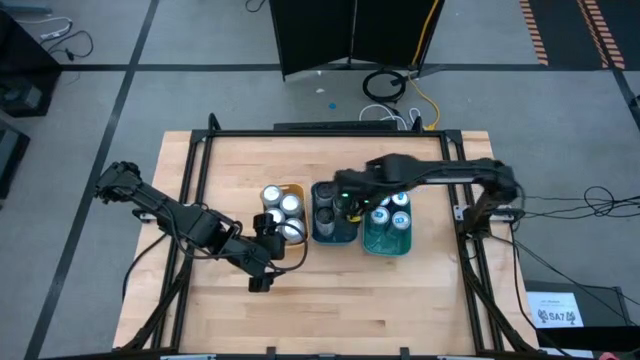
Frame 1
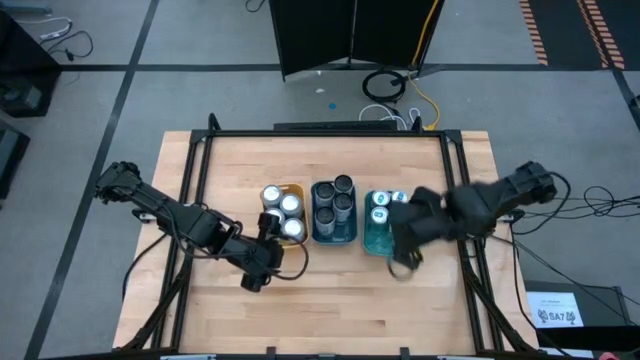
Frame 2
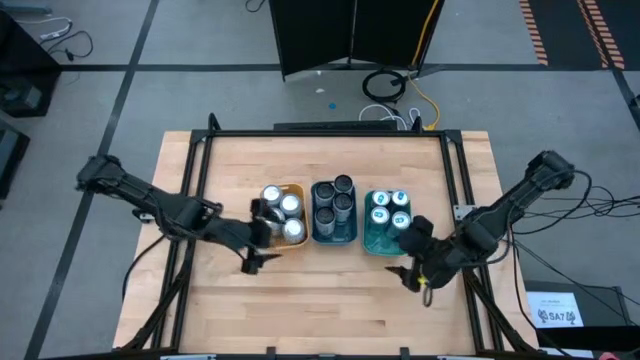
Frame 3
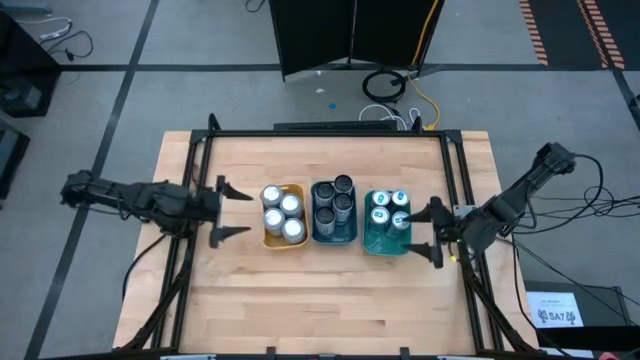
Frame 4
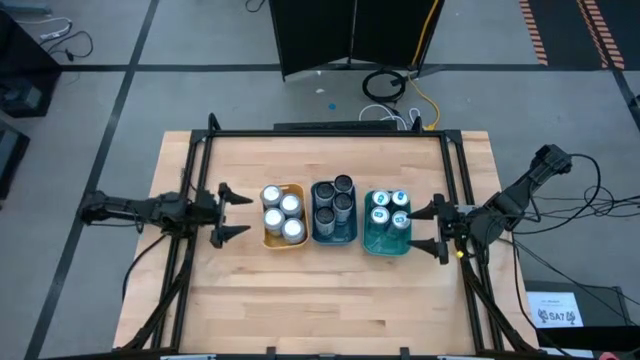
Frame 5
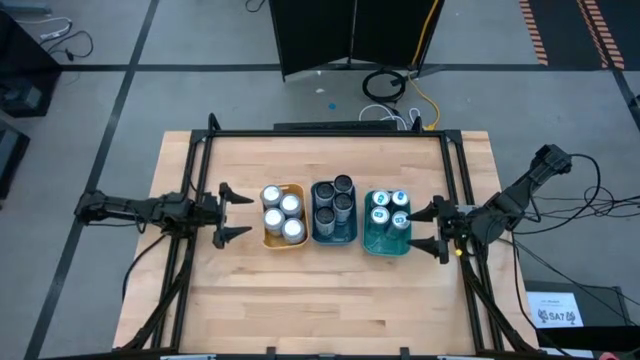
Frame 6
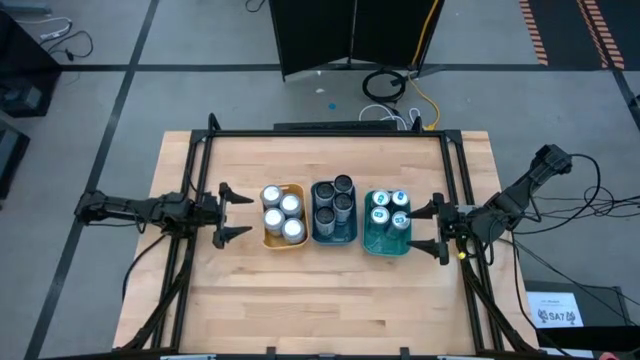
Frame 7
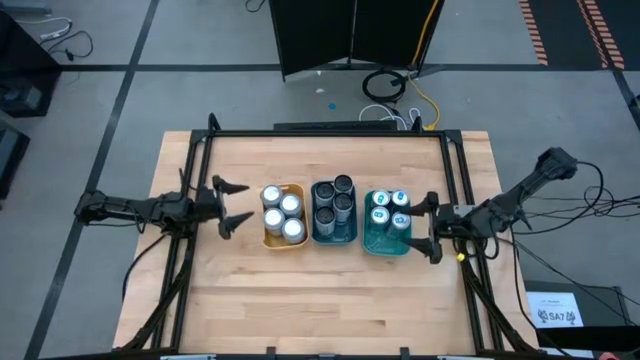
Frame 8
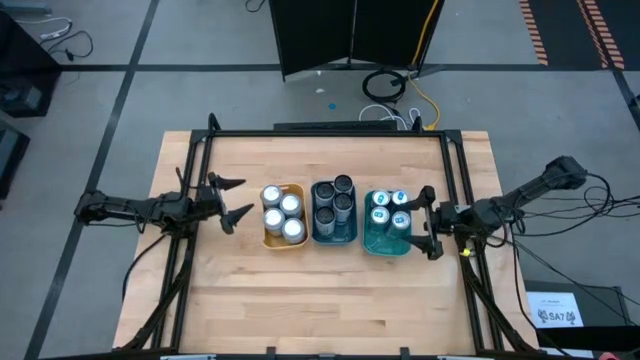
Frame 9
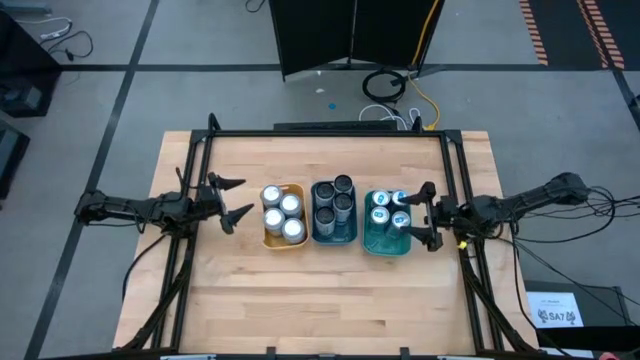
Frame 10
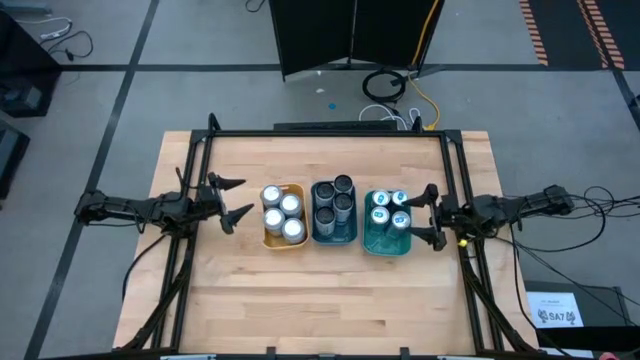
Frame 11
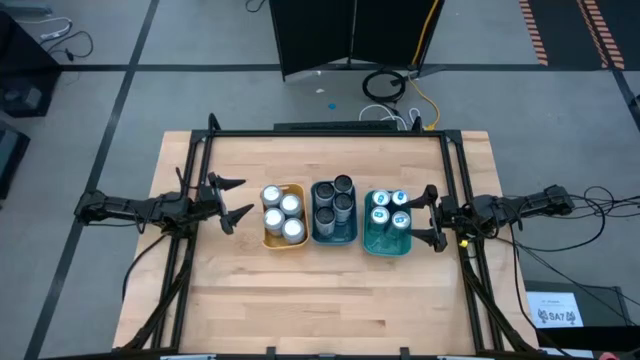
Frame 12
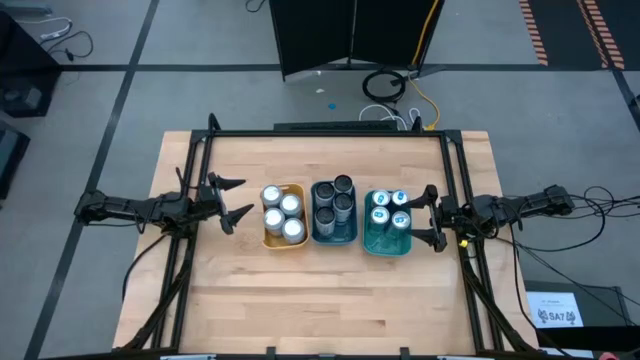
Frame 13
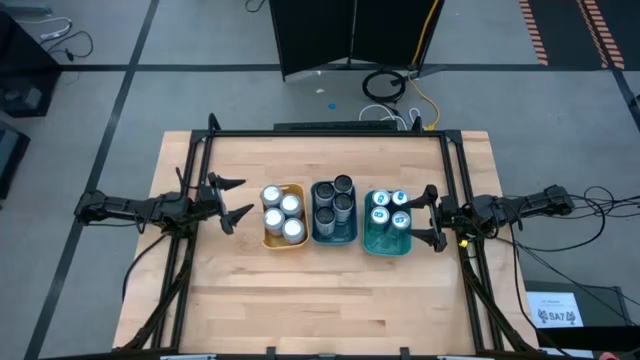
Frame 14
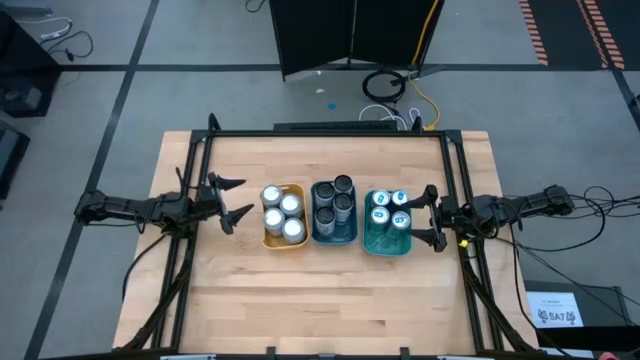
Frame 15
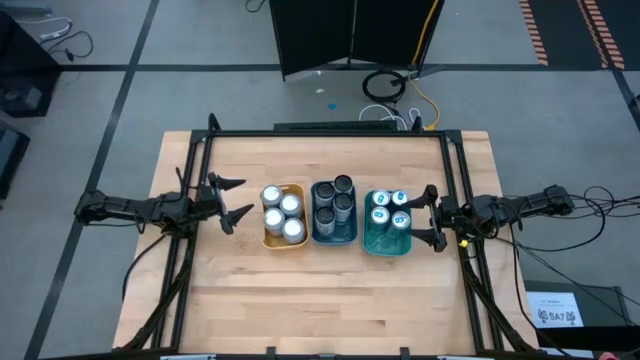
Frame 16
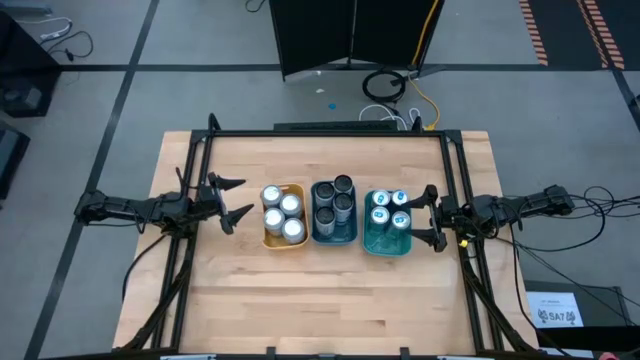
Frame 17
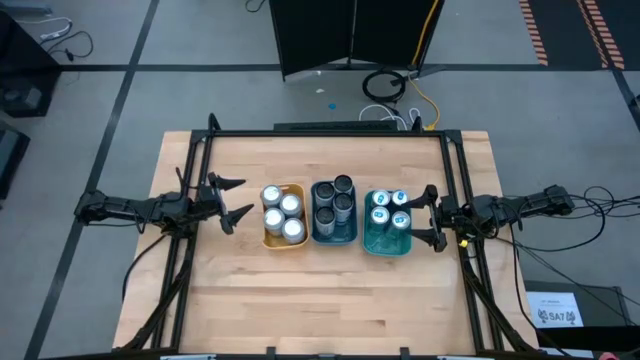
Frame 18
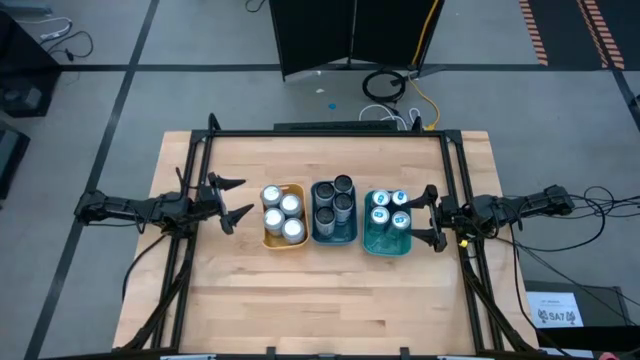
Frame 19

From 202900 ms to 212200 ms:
Task: Sort soda cans
Return to Home Position

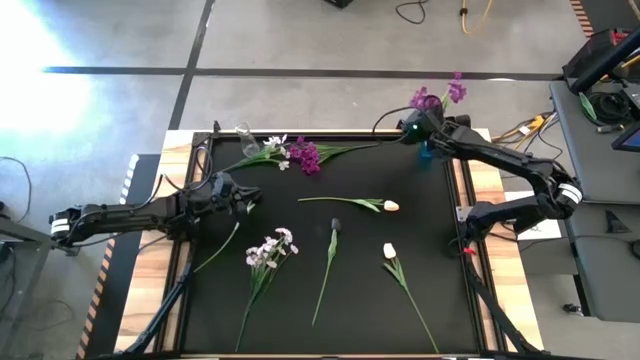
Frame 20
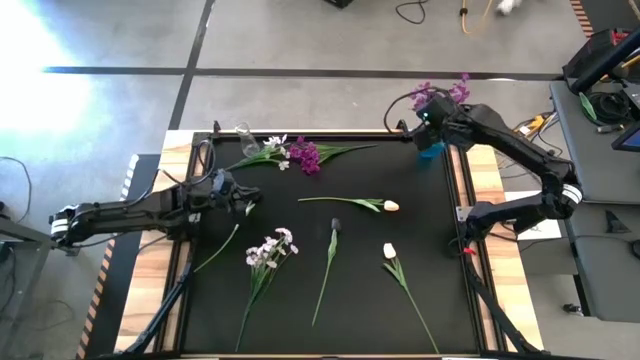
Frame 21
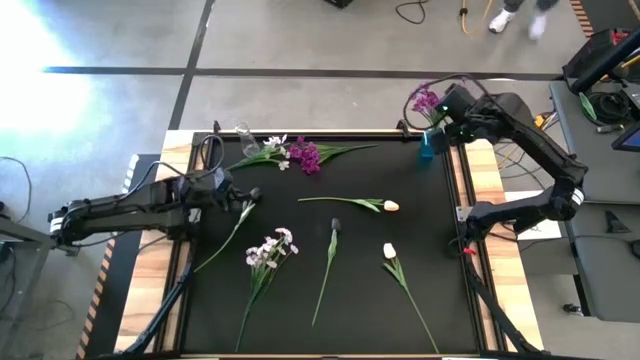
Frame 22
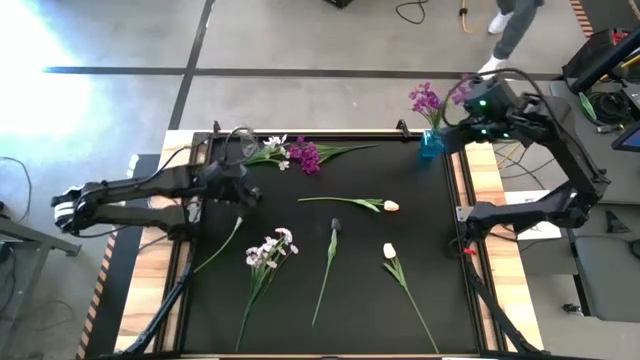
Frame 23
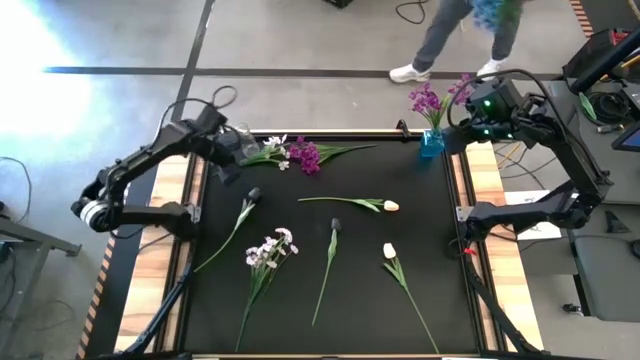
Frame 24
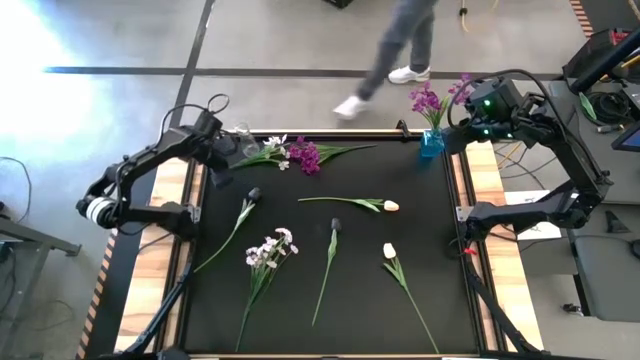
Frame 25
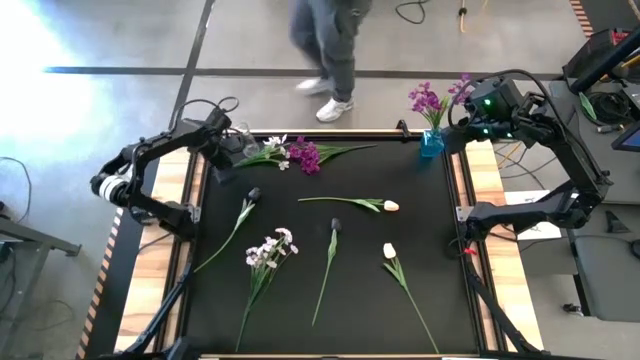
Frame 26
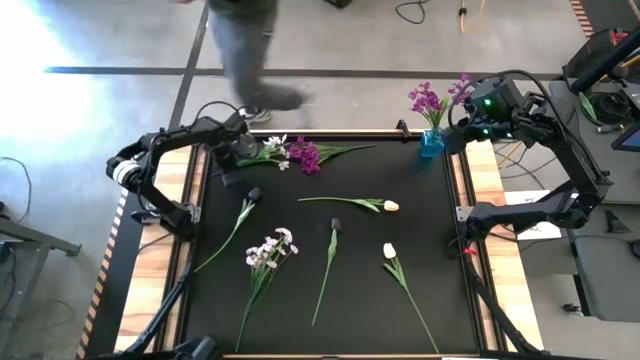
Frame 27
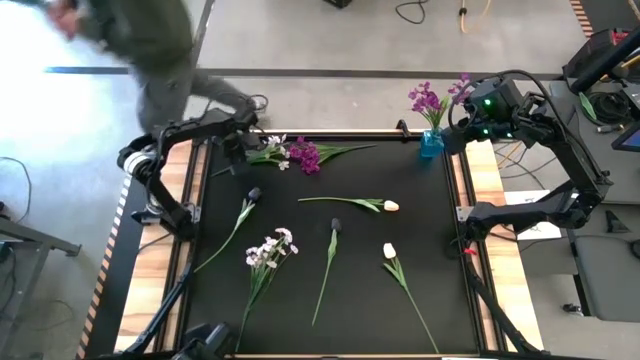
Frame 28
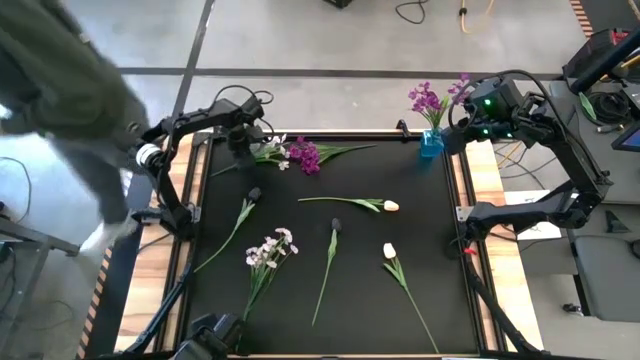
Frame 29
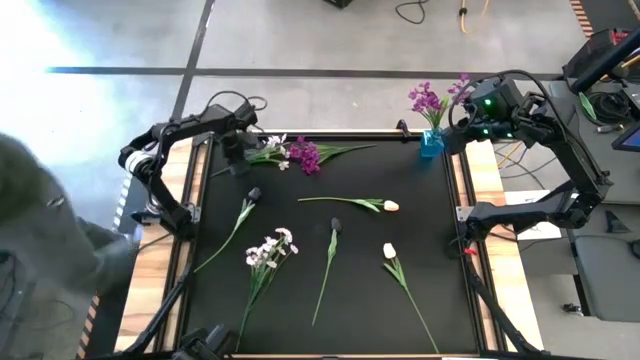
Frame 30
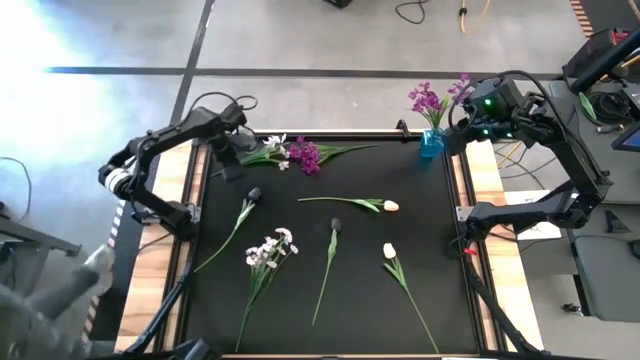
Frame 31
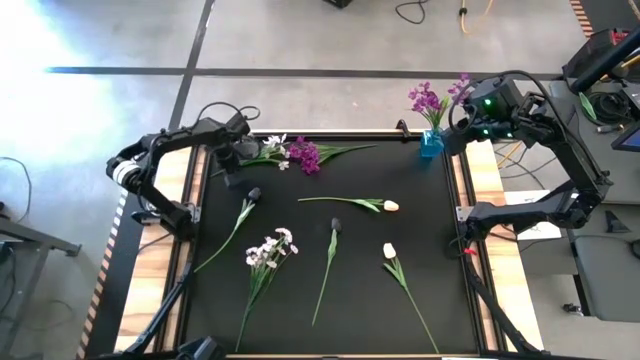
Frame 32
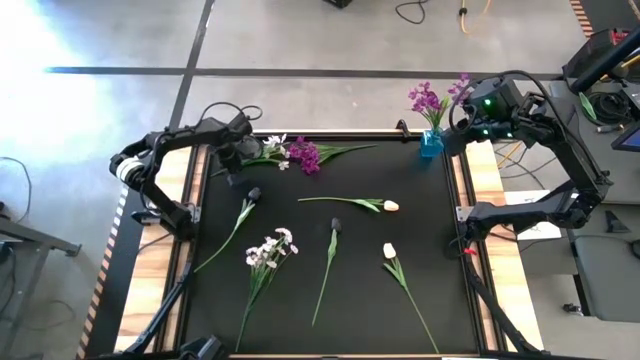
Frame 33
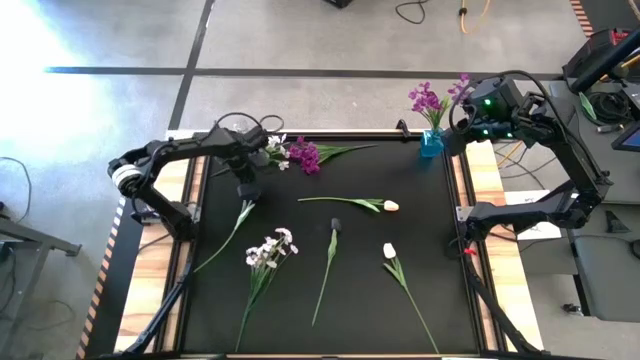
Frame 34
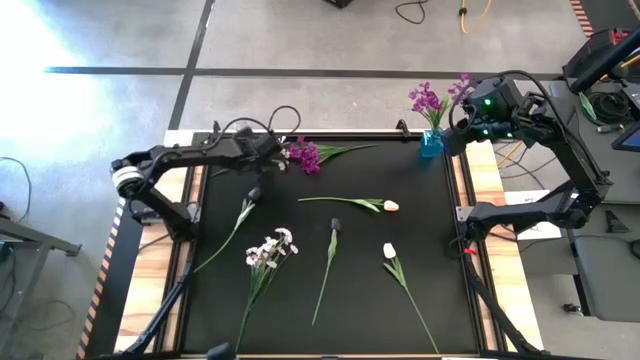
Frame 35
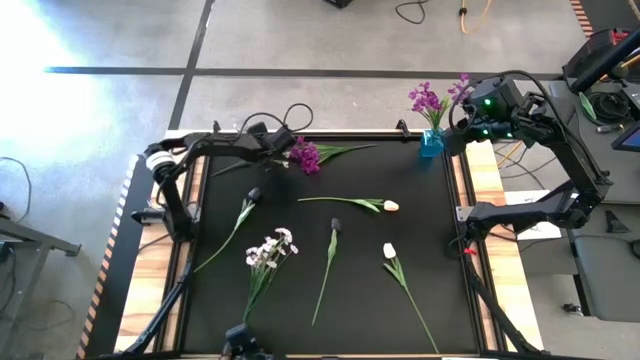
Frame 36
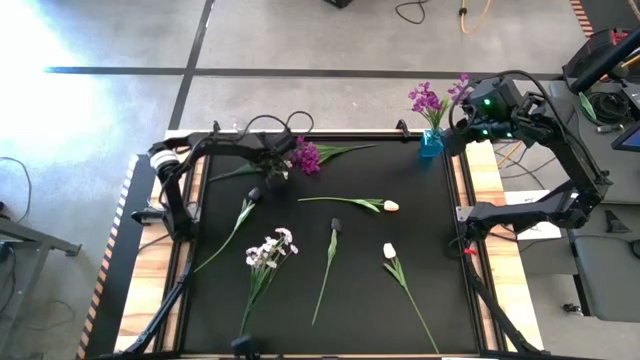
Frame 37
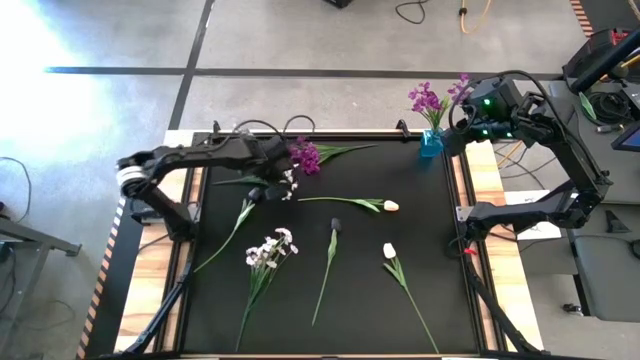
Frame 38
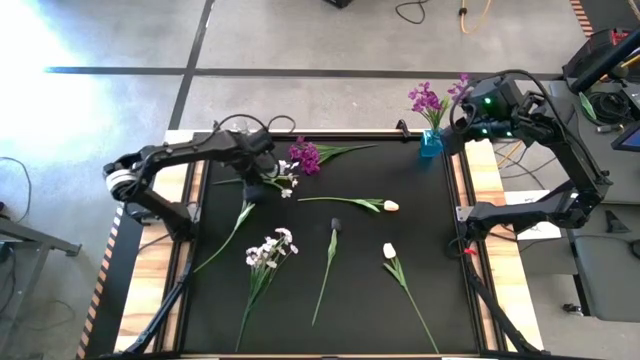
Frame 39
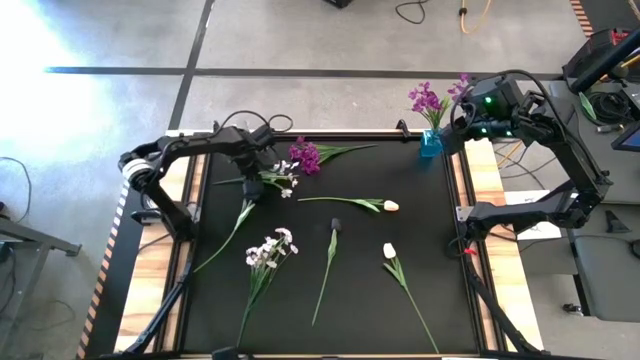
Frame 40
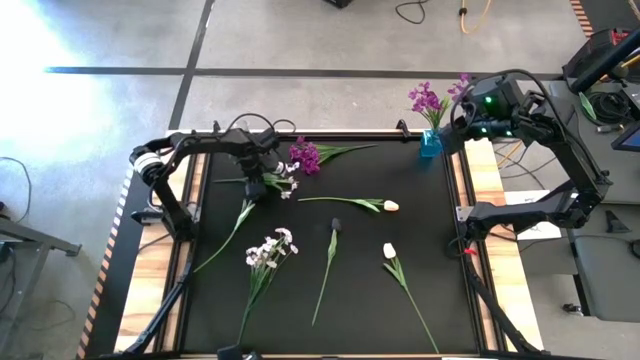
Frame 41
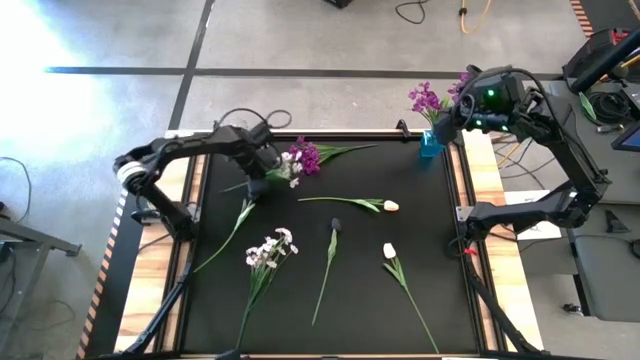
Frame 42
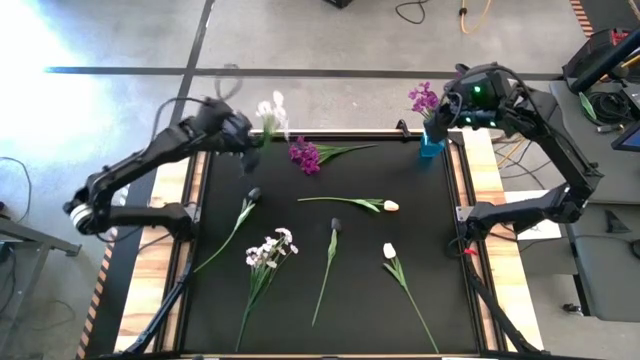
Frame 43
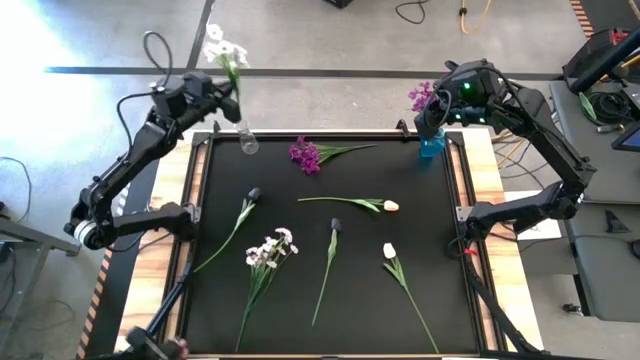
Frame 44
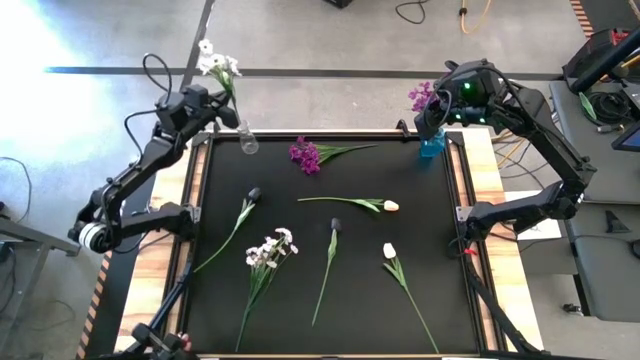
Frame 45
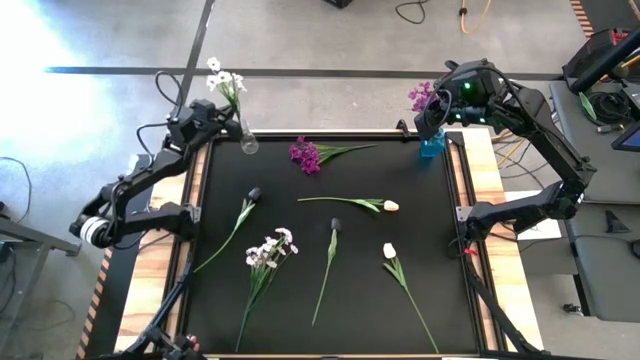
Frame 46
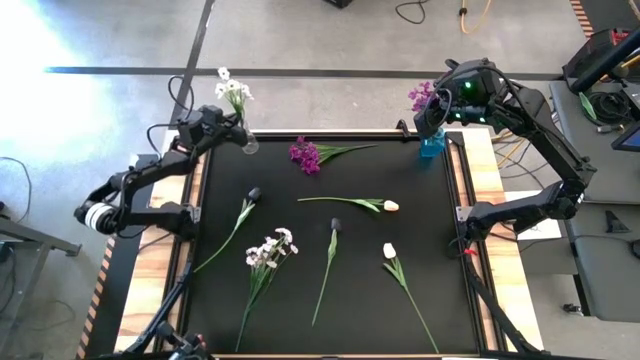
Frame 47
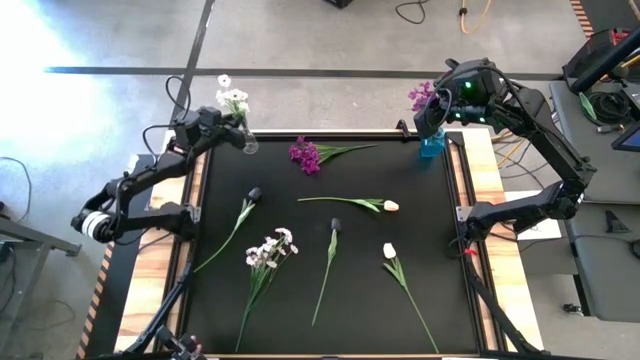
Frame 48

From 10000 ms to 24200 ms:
Task: Sort flowers into vase by color
Put the top white flowers into the transparent vase
